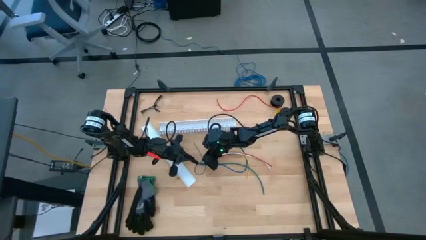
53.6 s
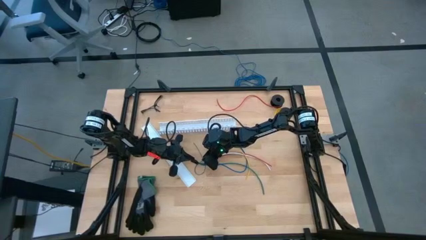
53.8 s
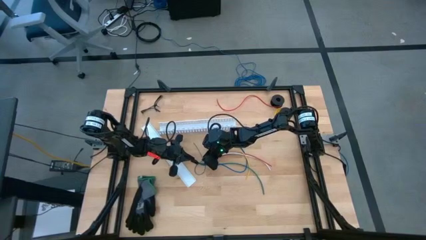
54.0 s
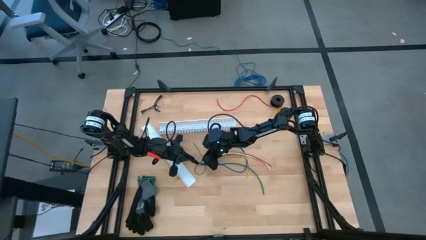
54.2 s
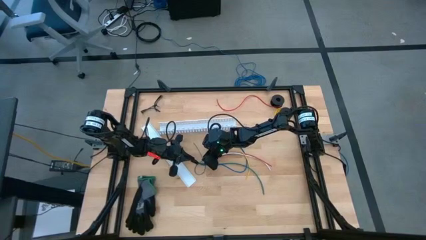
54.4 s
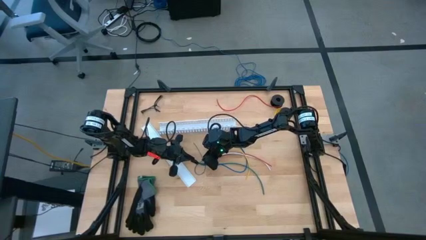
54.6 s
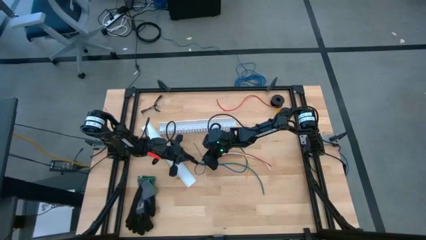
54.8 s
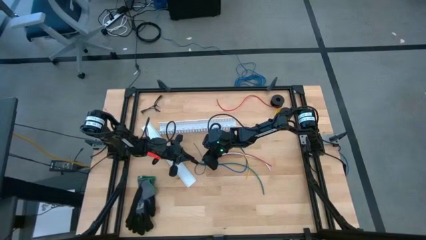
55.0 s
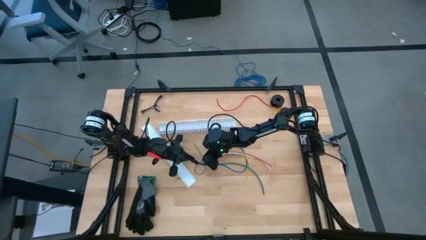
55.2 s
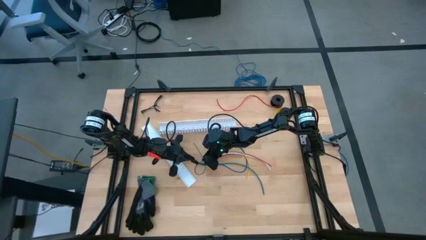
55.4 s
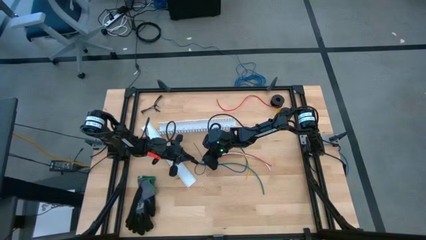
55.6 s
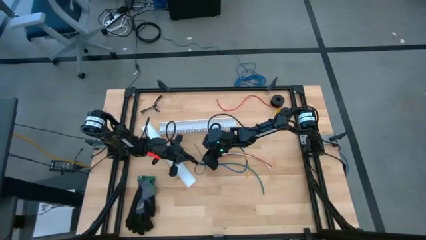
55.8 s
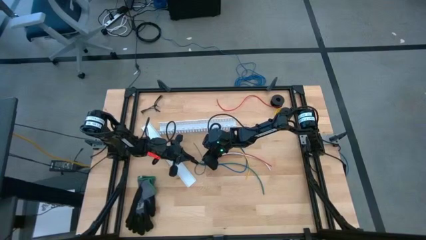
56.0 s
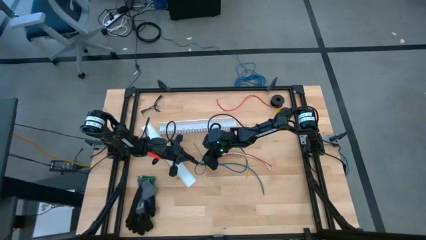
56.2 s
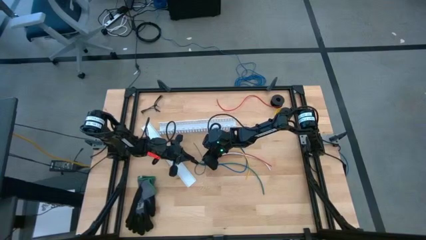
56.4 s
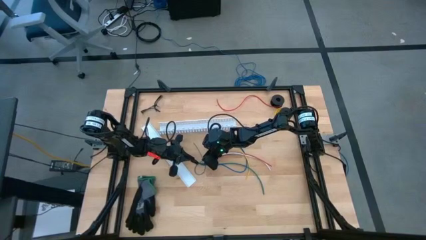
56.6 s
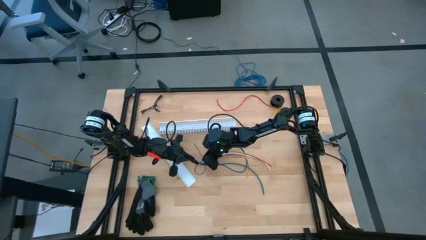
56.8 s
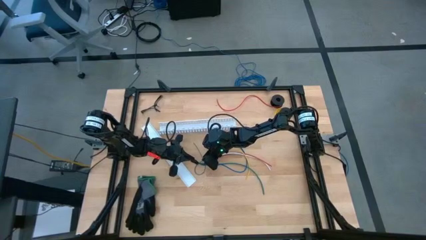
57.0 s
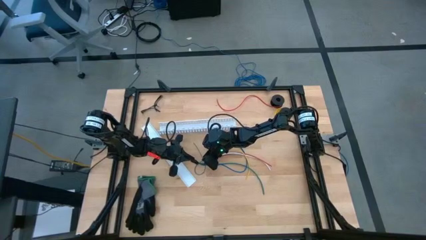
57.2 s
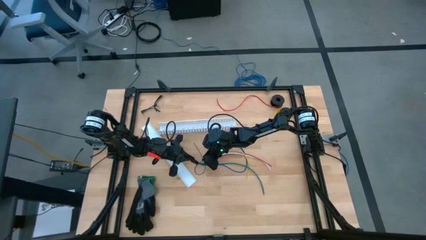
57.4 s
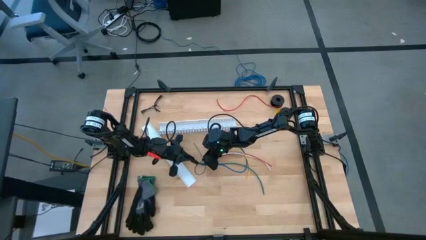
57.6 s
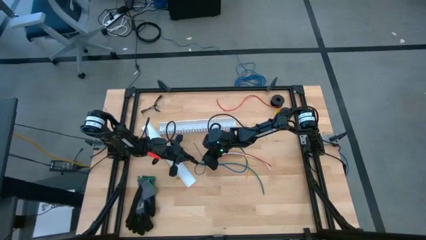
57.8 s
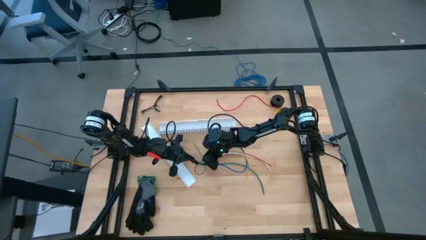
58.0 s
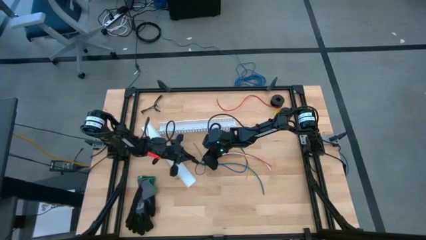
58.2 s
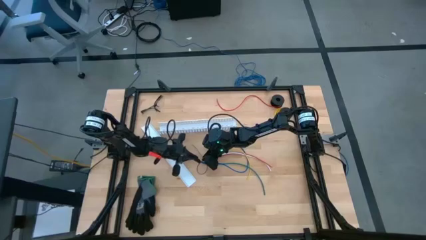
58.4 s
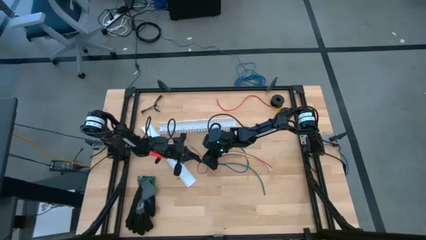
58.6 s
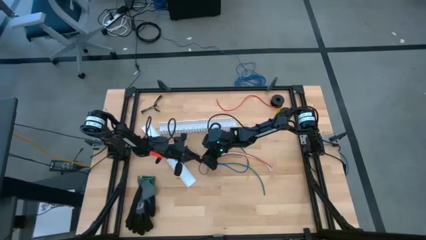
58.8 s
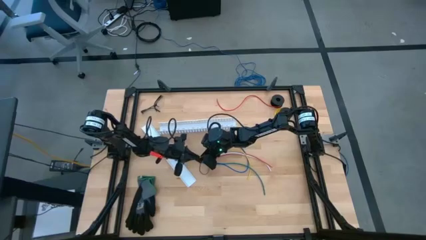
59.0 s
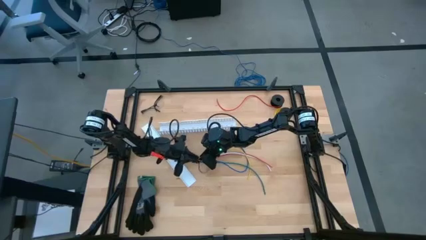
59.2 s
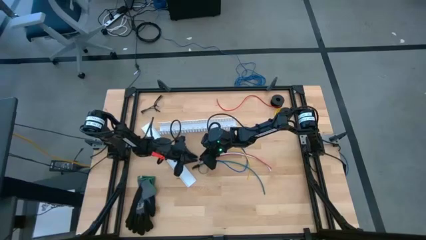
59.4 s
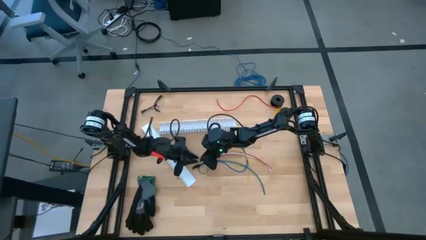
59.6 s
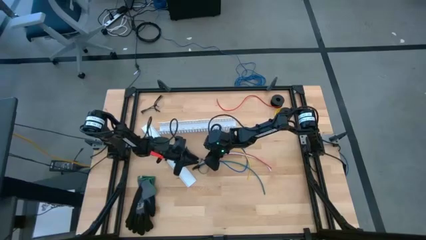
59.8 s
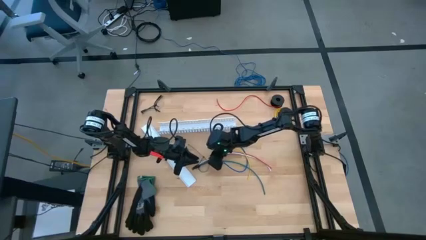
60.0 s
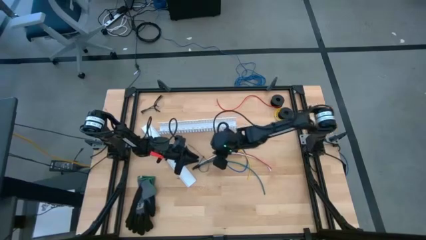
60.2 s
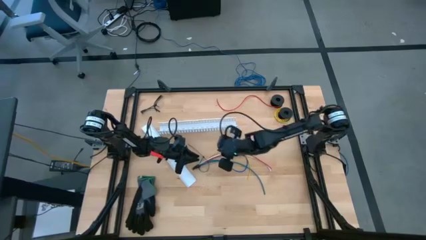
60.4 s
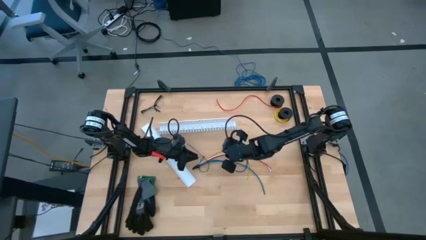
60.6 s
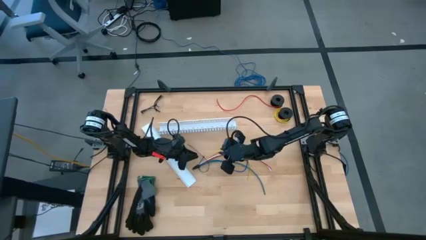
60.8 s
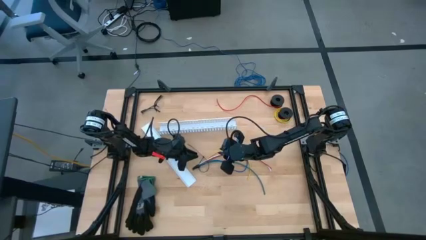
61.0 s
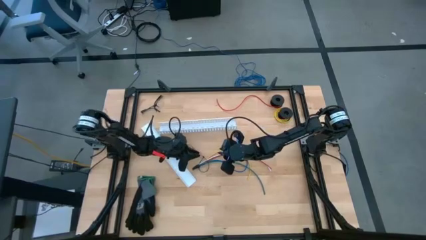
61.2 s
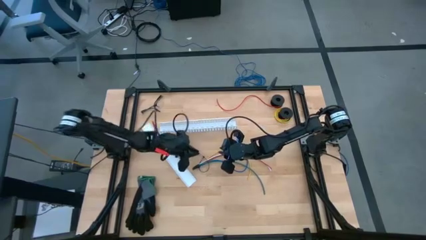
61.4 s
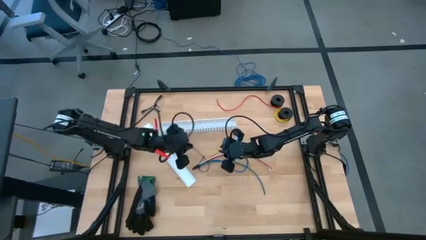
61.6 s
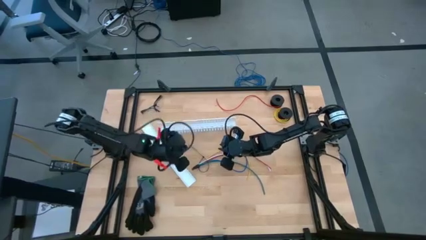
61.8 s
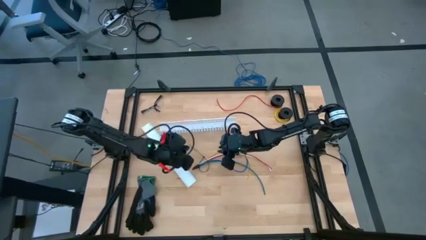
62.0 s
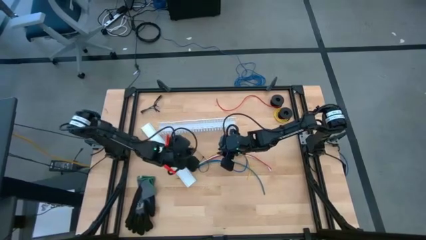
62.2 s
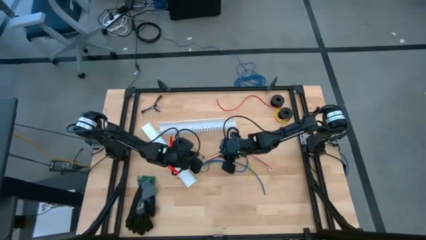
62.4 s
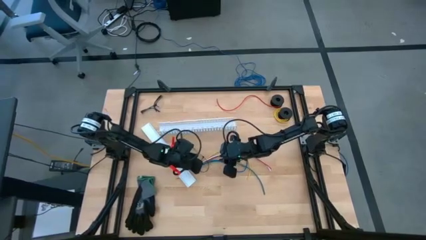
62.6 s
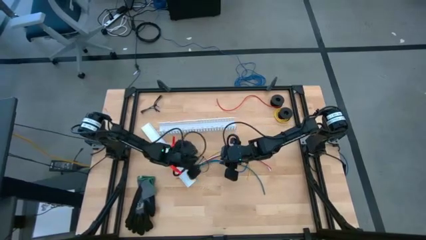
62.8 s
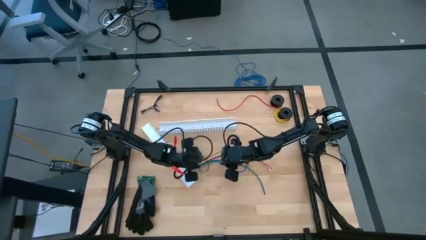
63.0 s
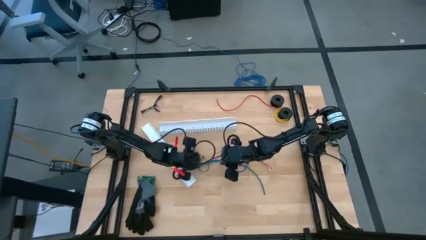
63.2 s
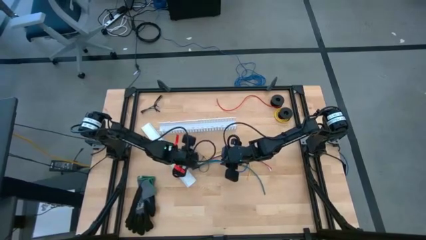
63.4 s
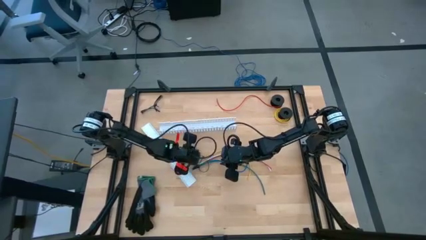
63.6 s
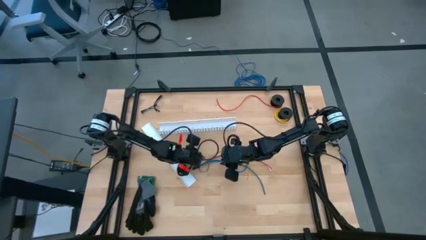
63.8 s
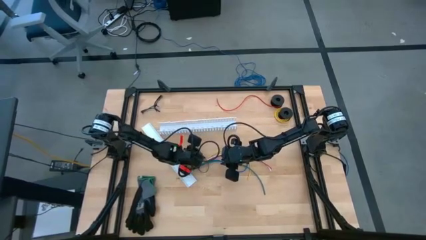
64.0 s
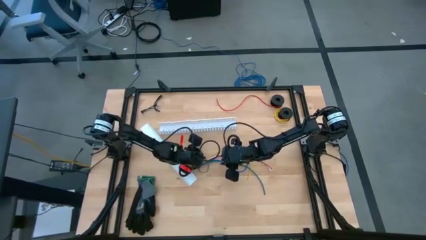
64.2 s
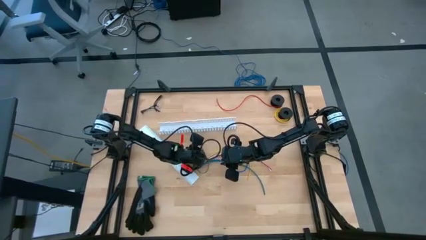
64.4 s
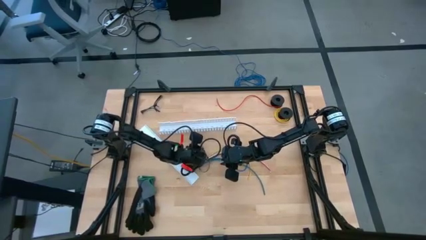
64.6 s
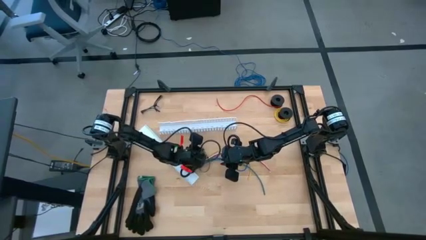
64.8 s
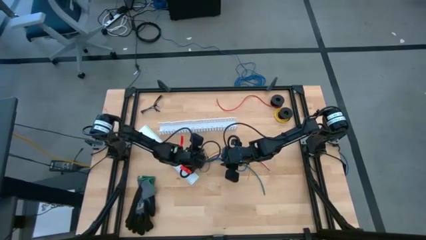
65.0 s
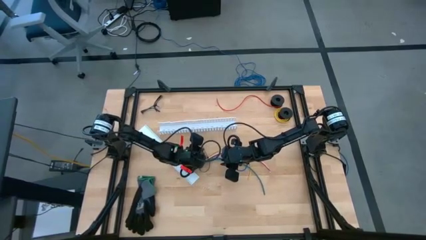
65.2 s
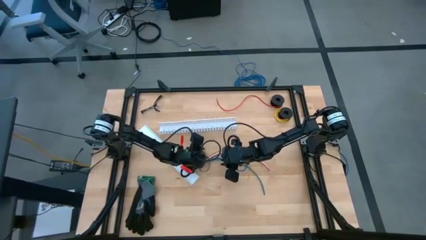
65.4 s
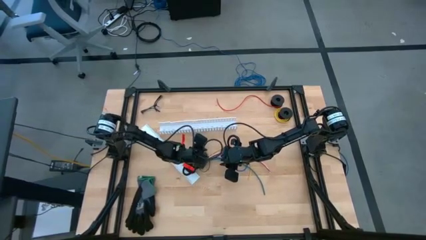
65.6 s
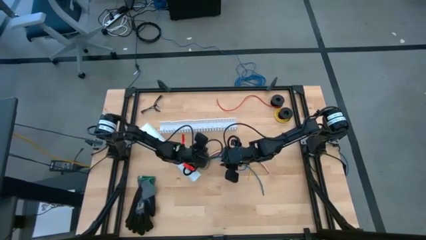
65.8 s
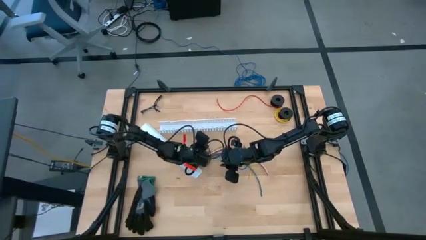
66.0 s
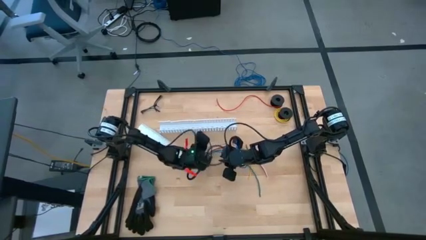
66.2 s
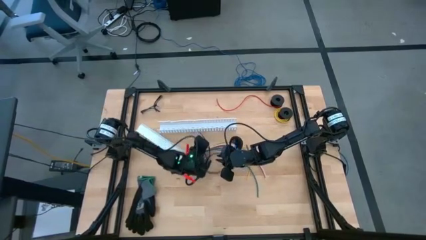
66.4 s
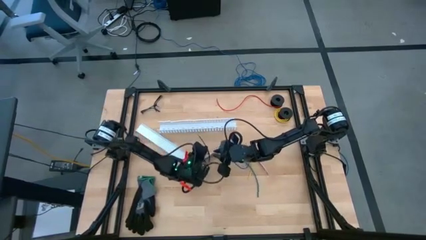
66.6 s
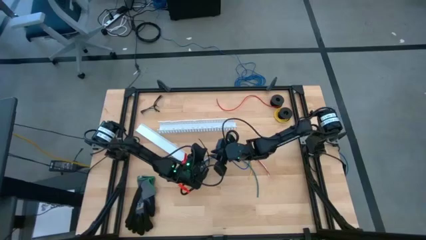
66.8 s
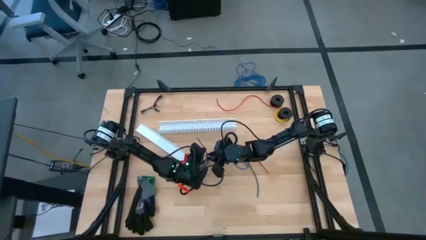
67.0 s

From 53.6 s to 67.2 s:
Task: Ziptie cables
Wrap the cables with the black zip tie

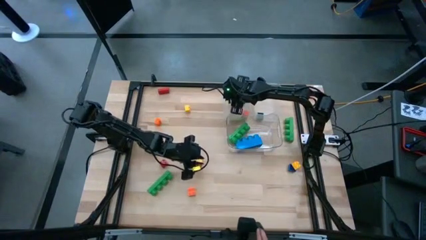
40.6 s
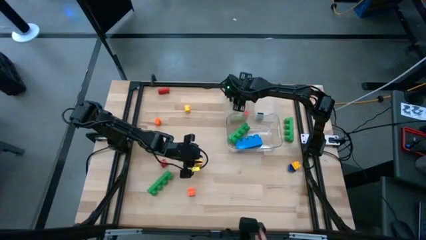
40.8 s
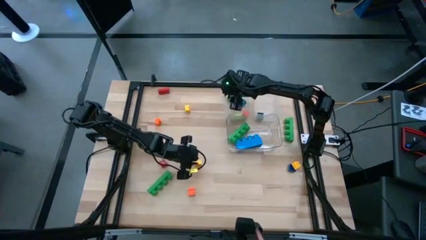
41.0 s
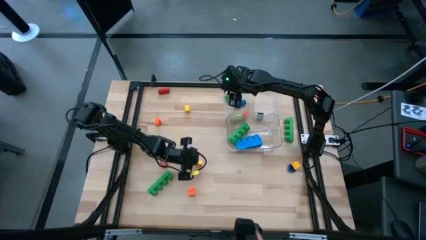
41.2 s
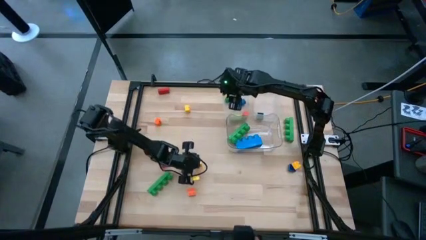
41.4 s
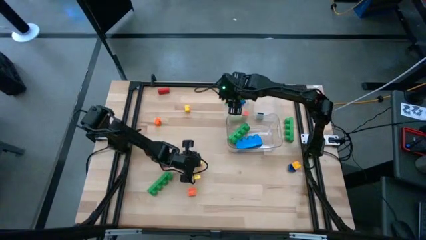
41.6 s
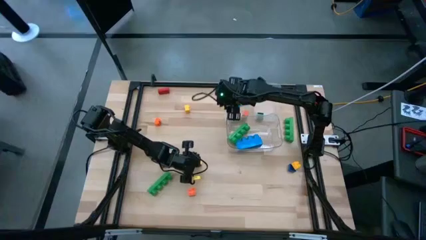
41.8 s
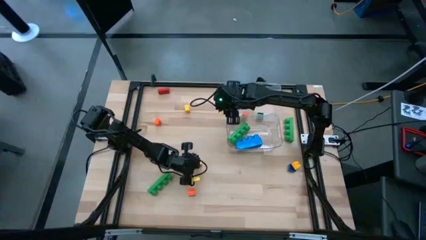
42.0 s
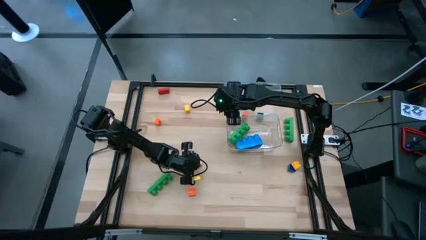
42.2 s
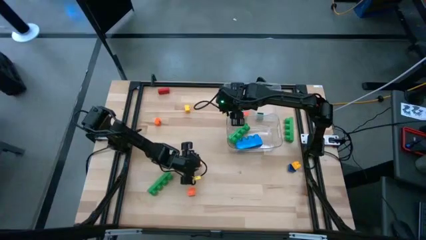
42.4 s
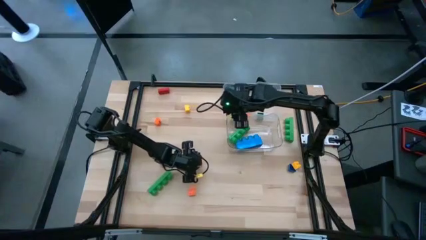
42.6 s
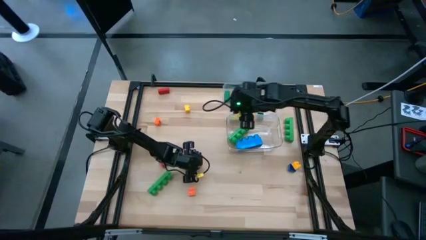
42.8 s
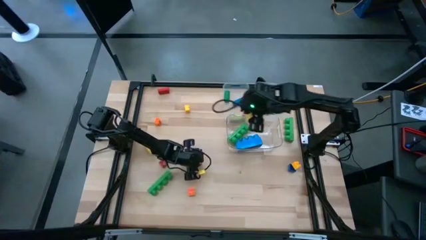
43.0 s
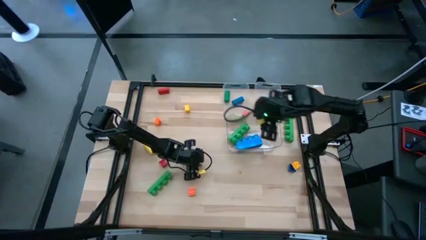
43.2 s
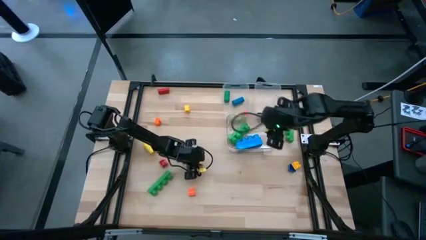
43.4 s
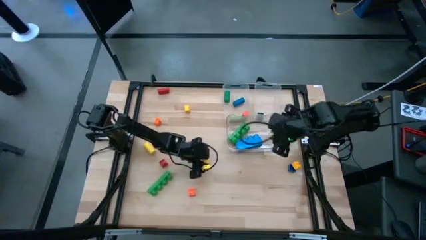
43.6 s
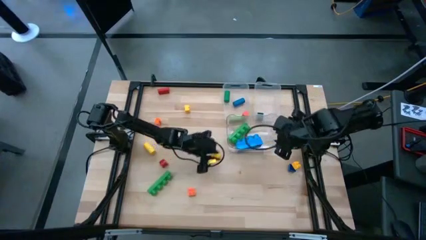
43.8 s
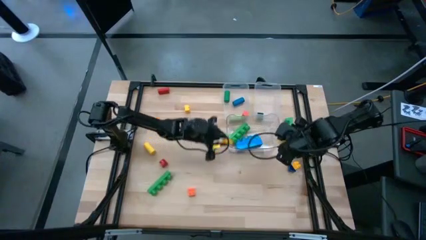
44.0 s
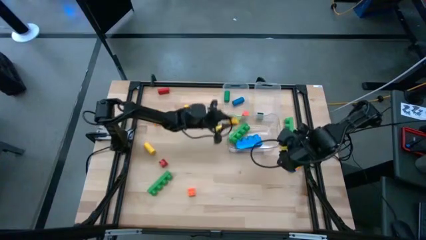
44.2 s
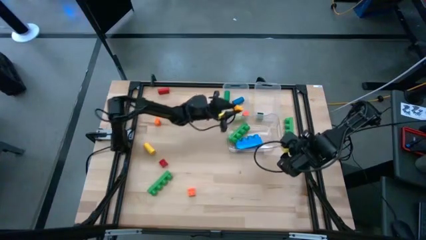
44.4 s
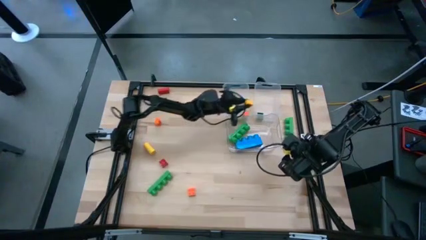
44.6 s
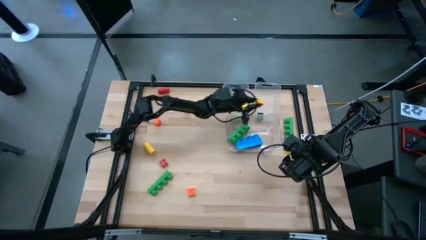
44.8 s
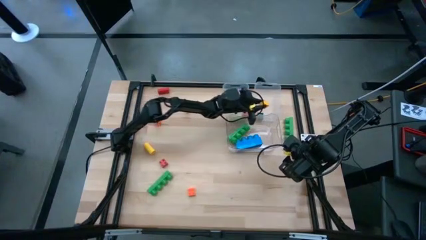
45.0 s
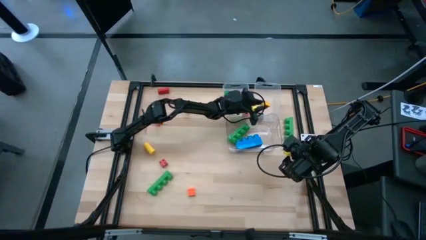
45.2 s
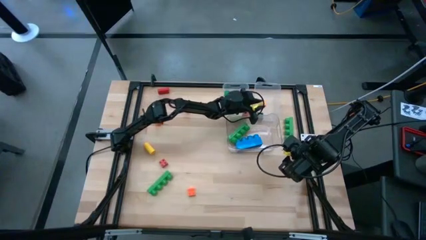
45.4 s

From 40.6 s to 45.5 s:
Task: Sort blocks by size
Put the bottom left small yellow 4 stud game piece into the right transparent bin
